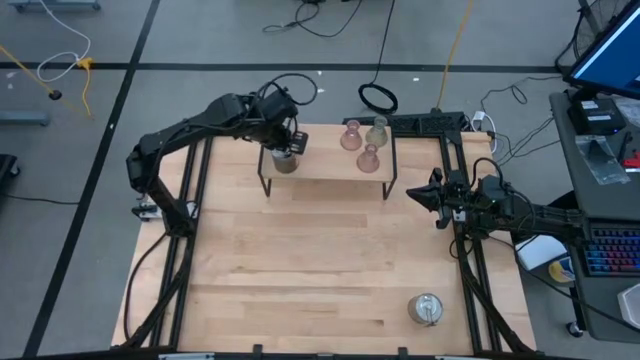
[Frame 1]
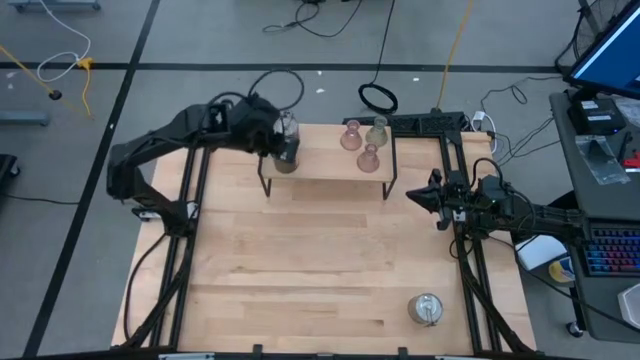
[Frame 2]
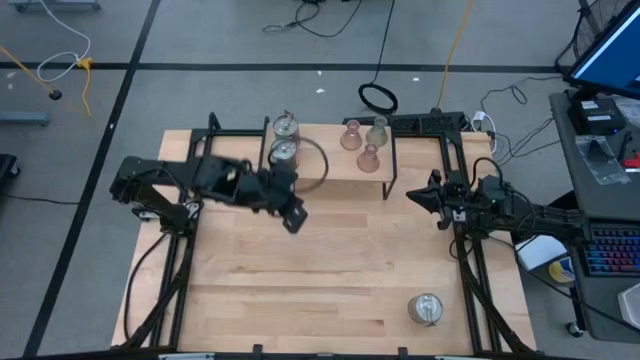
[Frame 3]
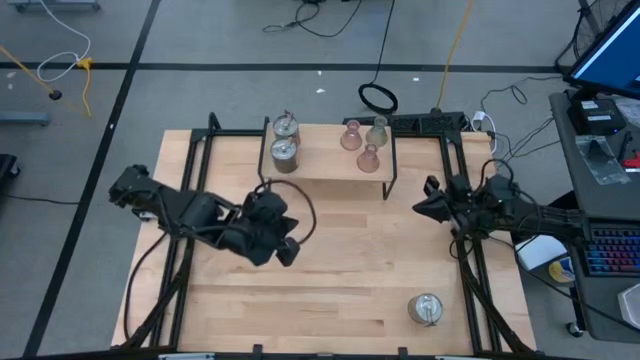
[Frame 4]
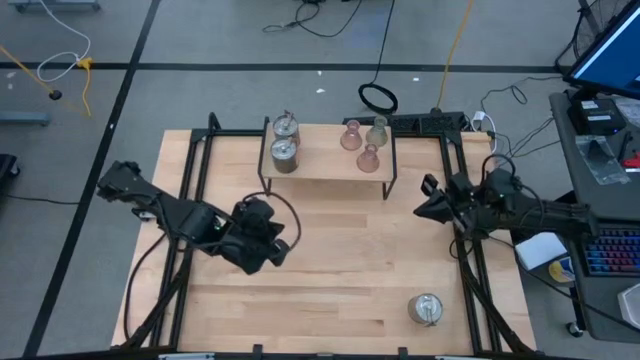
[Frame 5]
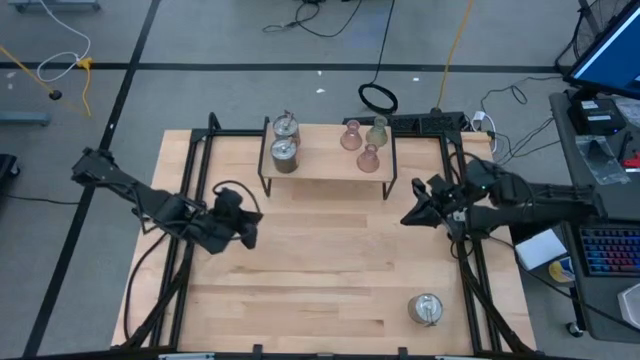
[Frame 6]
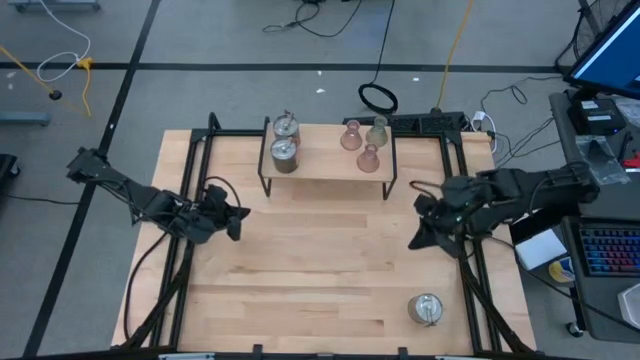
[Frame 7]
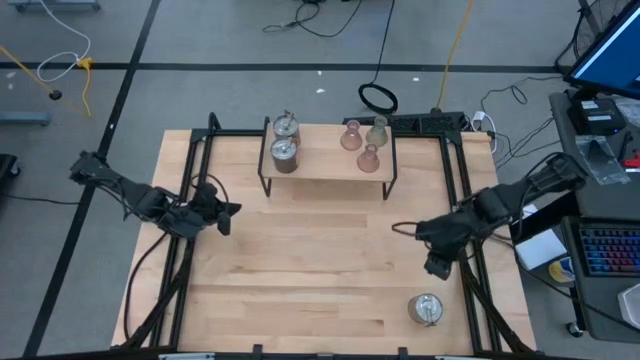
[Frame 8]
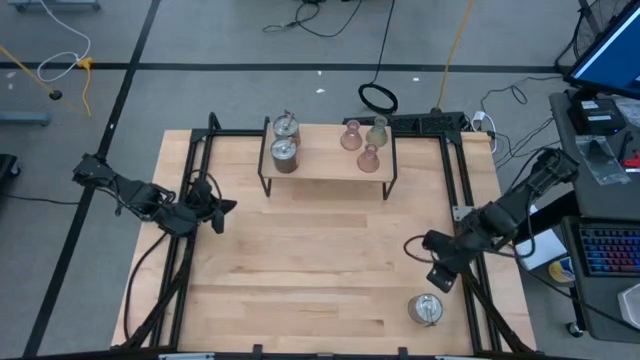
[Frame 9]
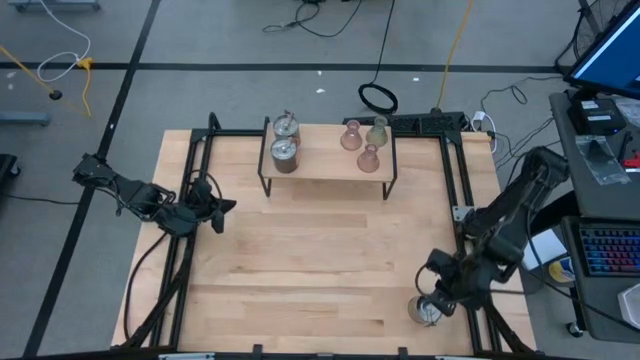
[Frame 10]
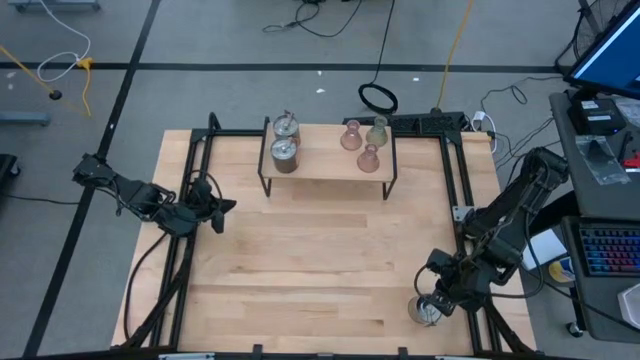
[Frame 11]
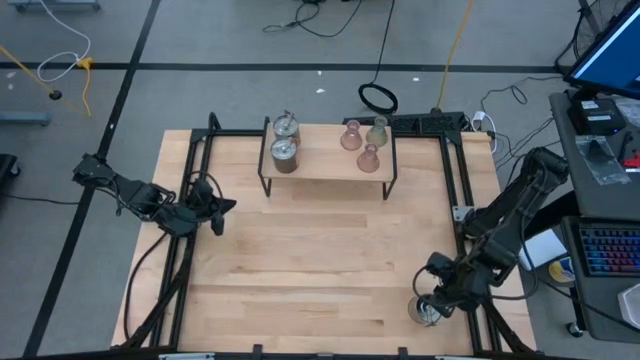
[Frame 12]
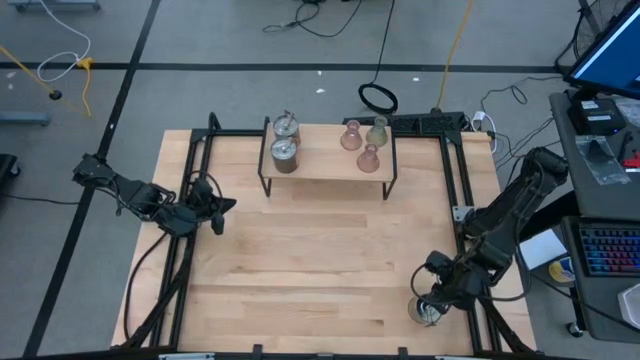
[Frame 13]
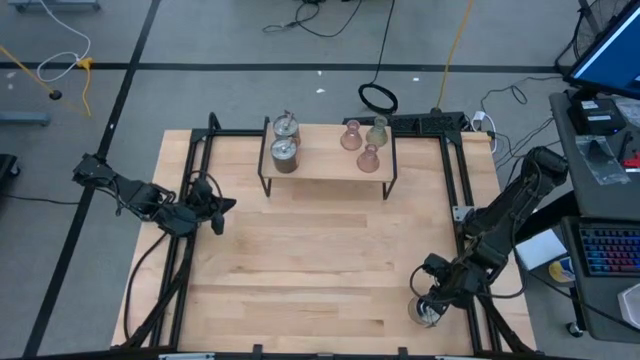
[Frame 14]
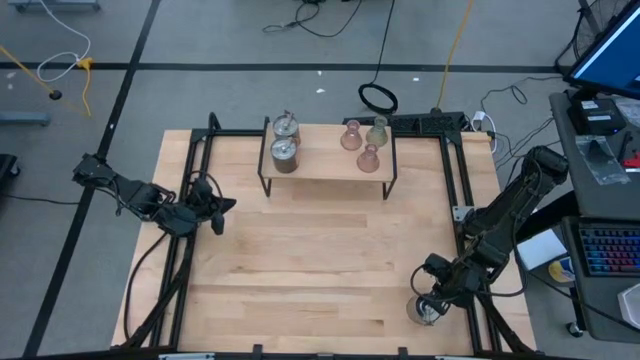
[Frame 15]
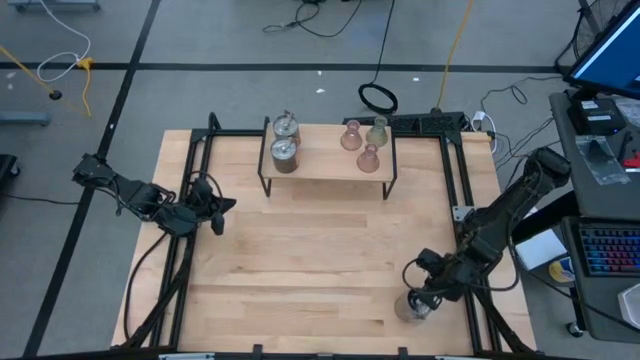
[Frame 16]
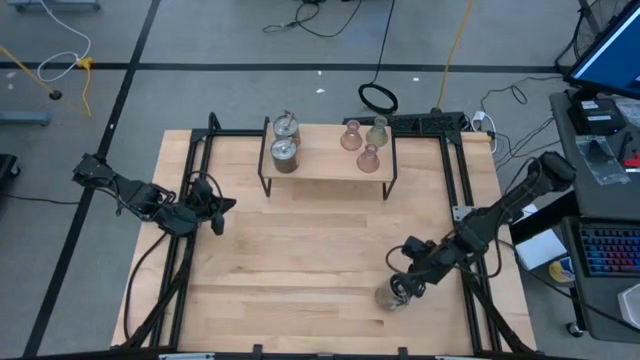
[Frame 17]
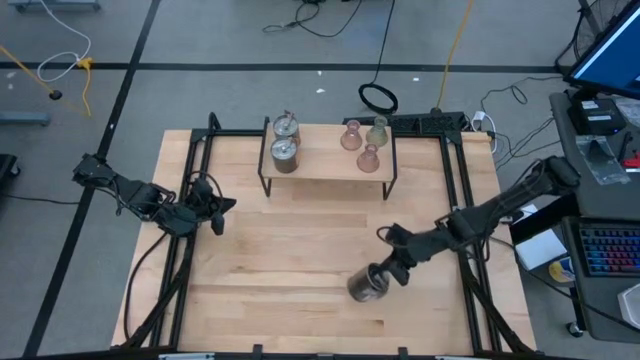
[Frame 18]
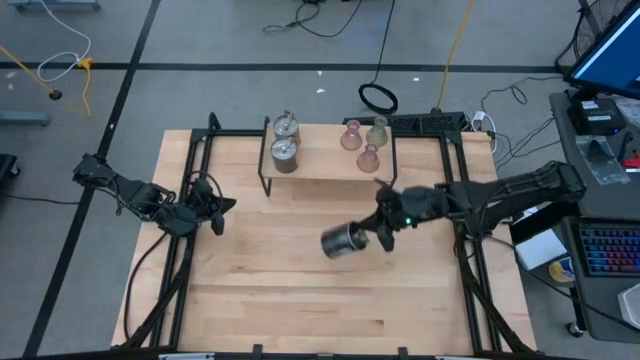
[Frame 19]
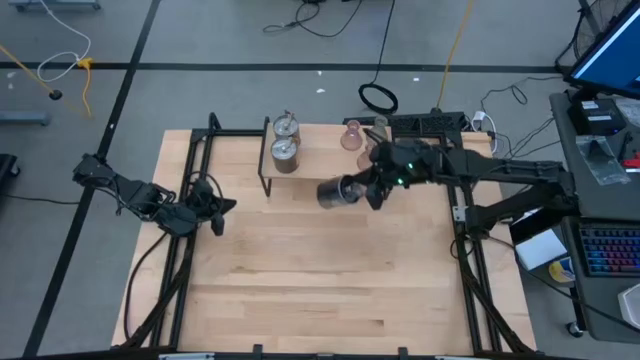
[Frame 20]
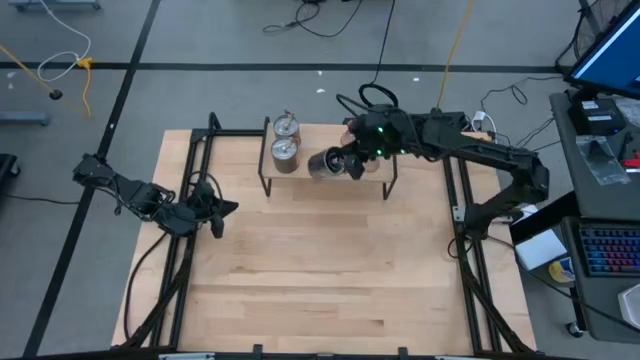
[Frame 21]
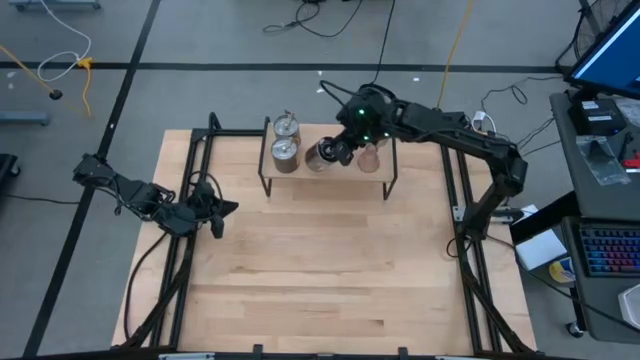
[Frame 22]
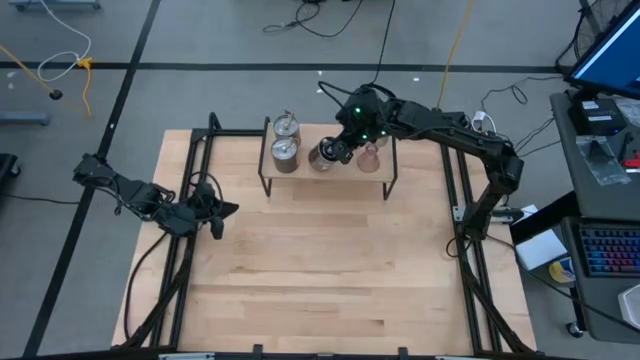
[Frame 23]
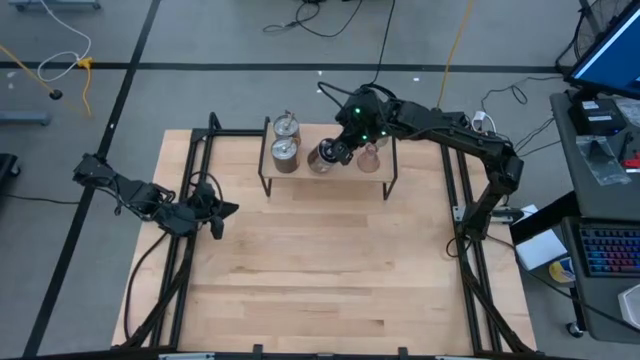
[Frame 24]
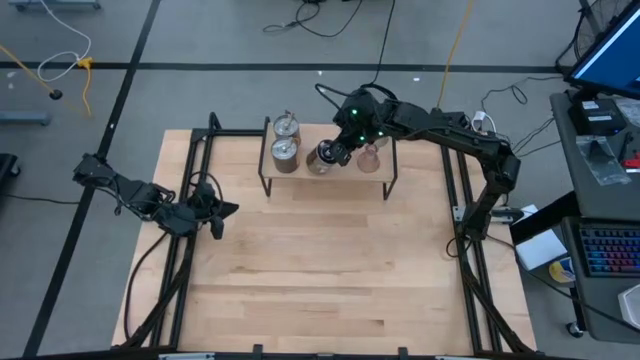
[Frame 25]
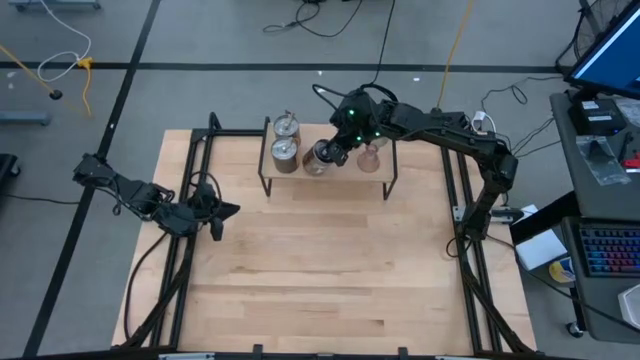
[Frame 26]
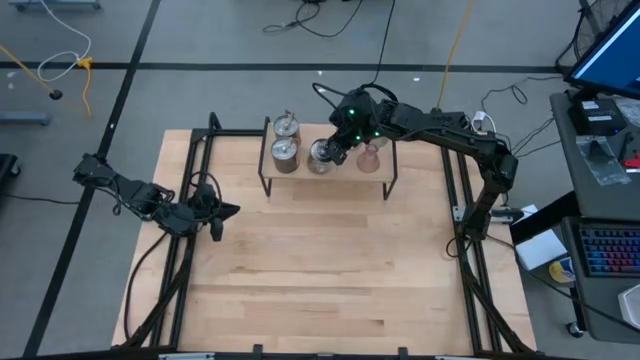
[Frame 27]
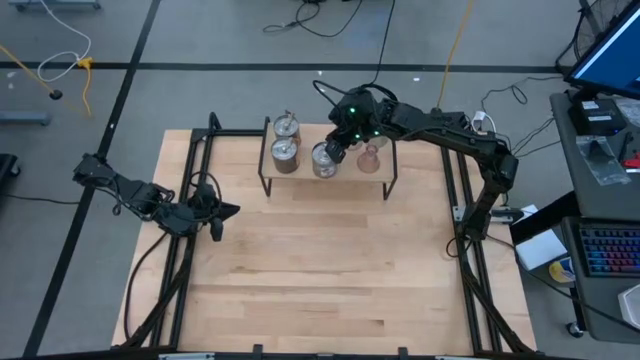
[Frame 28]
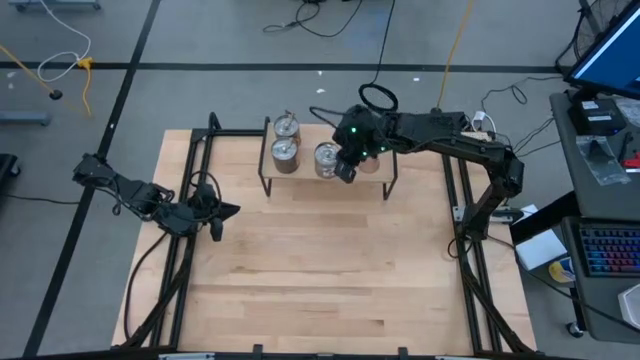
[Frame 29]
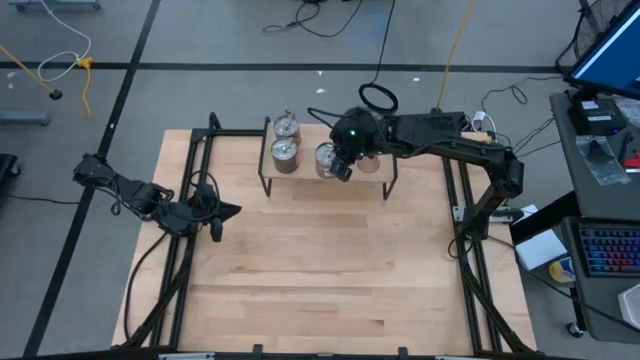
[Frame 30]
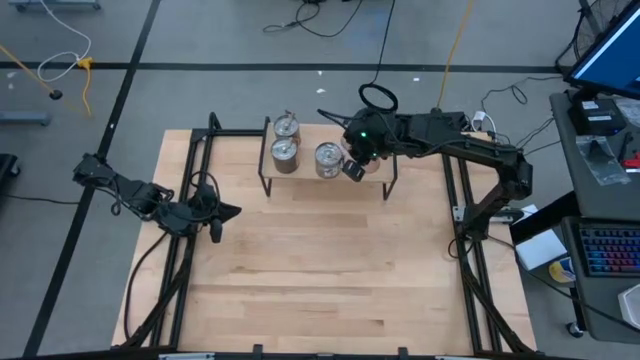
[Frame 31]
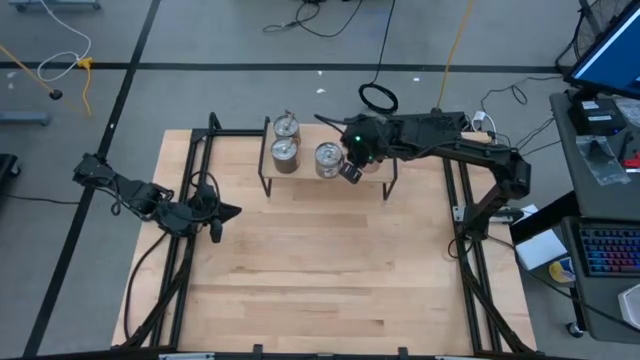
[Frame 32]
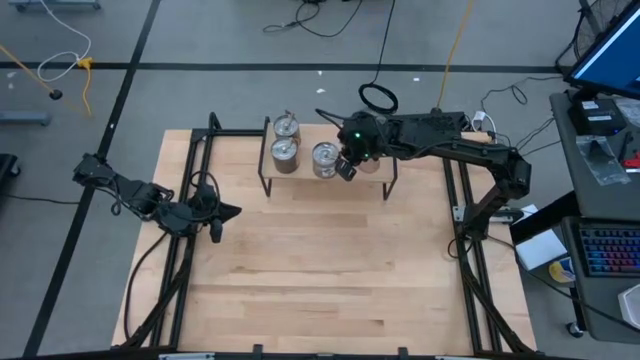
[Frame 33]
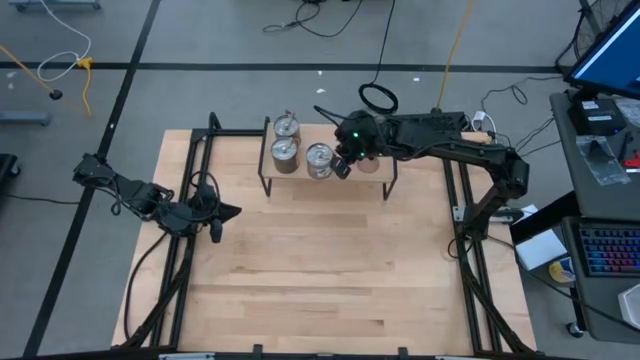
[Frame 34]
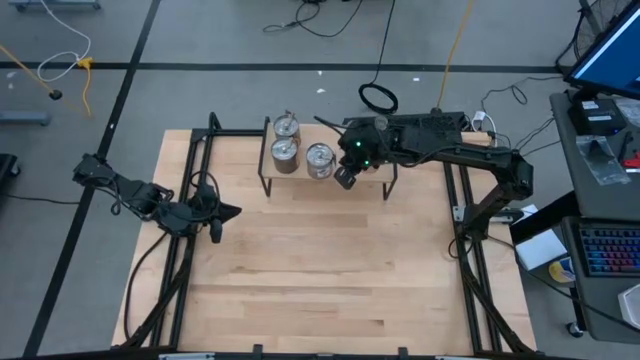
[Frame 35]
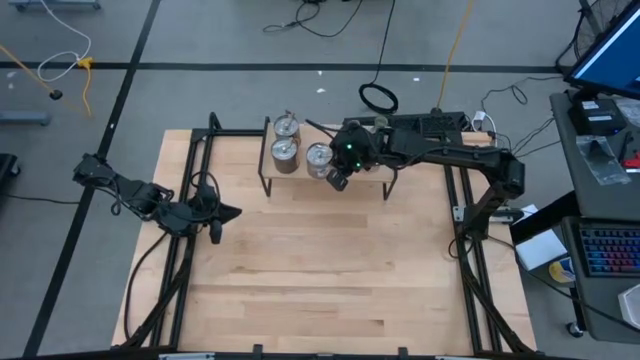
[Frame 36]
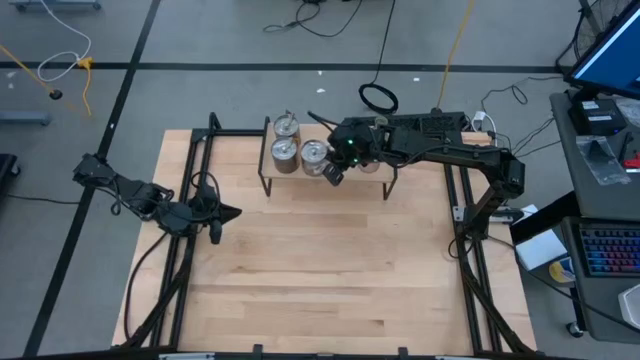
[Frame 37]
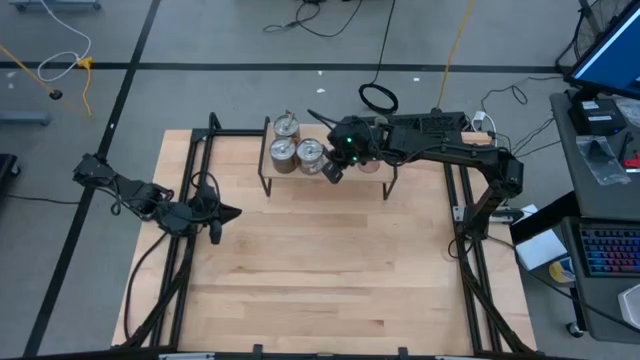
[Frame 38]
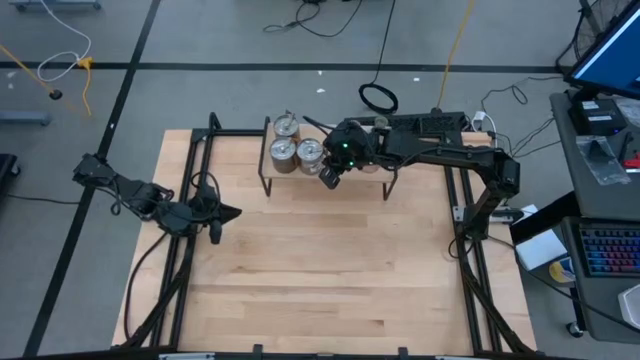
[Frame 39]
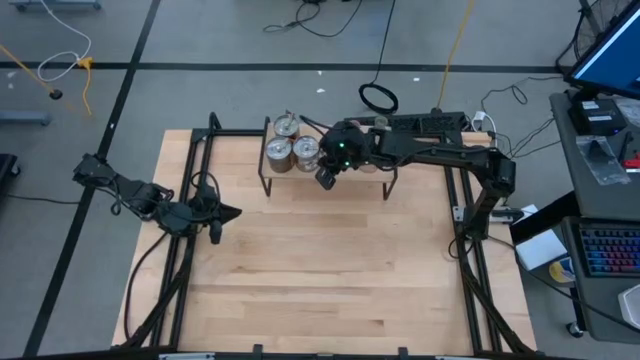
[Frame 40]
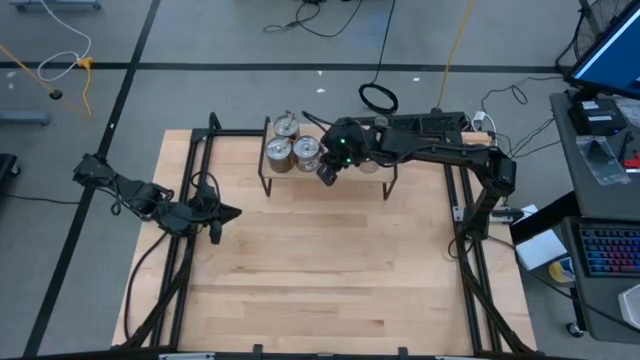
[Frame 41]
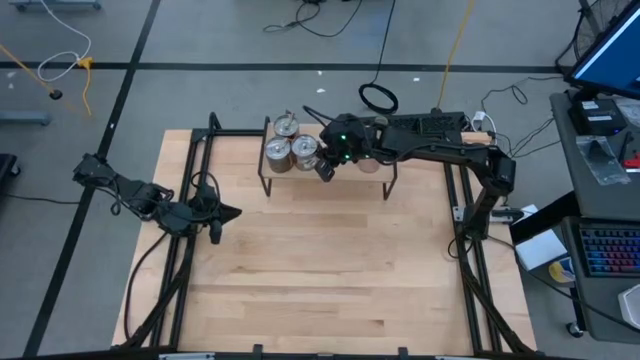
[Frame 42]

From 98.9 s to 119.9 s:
Task: Pick & Place candle stick holders
Put the silver scented candle on the shelf
